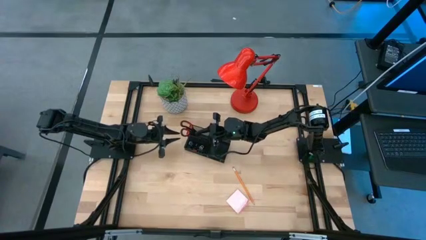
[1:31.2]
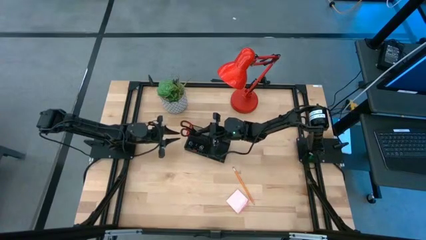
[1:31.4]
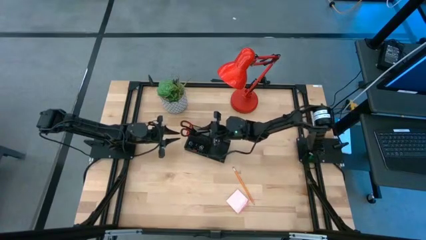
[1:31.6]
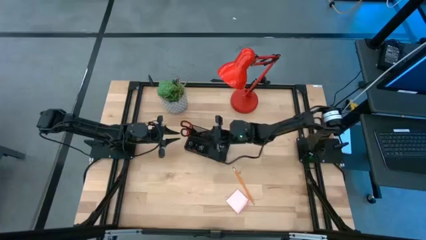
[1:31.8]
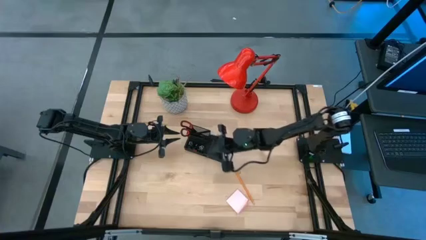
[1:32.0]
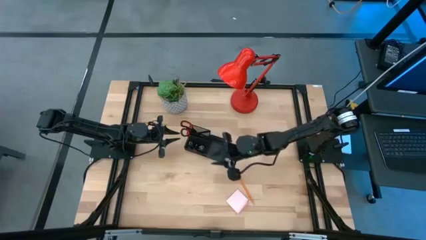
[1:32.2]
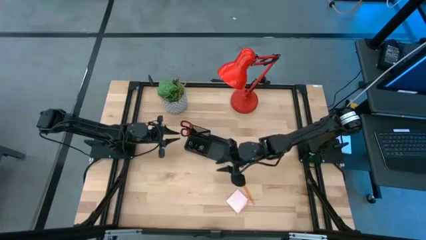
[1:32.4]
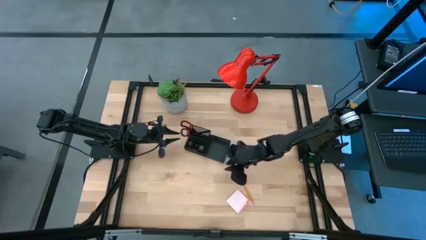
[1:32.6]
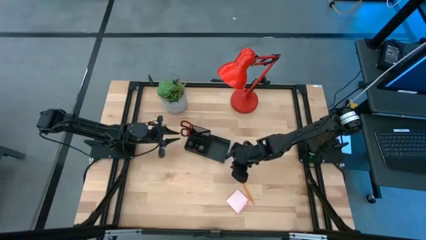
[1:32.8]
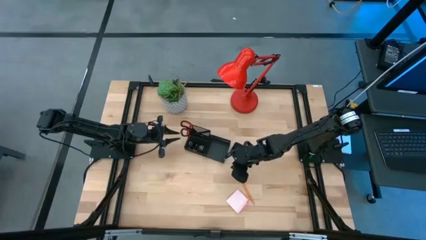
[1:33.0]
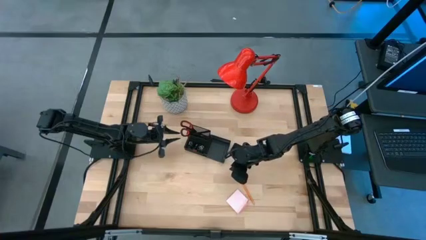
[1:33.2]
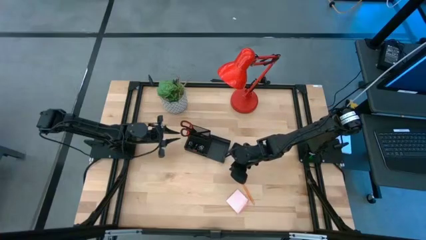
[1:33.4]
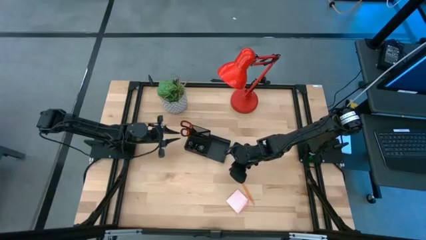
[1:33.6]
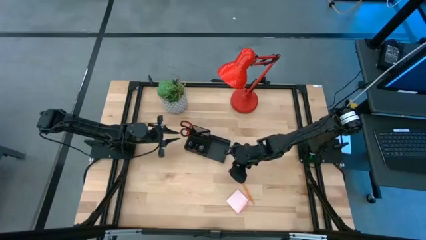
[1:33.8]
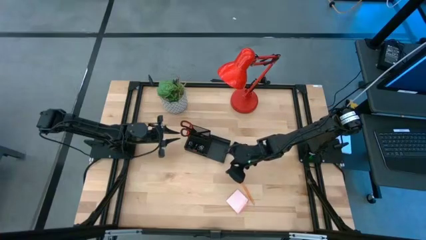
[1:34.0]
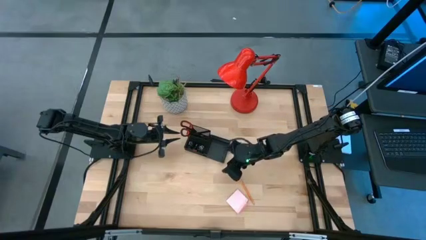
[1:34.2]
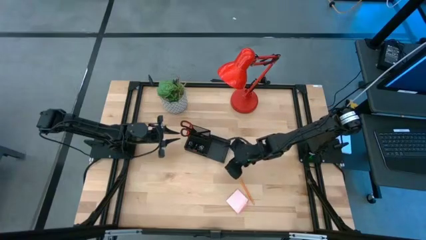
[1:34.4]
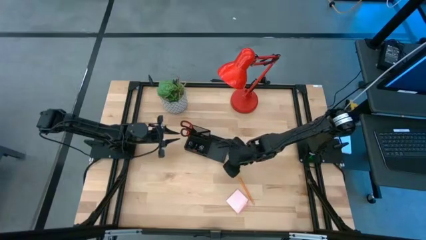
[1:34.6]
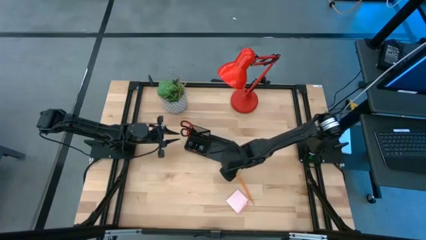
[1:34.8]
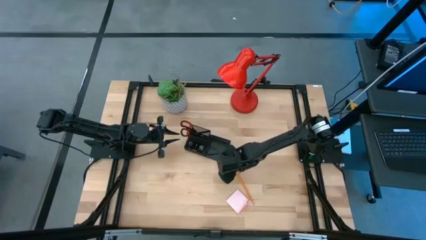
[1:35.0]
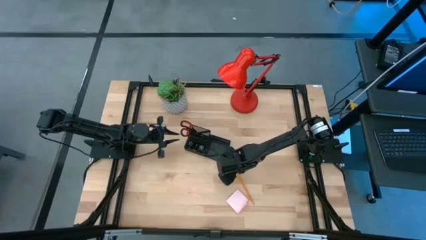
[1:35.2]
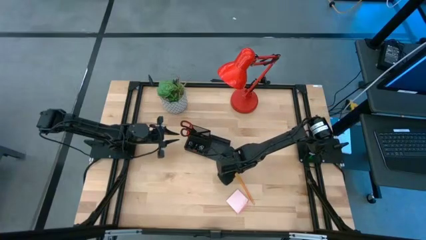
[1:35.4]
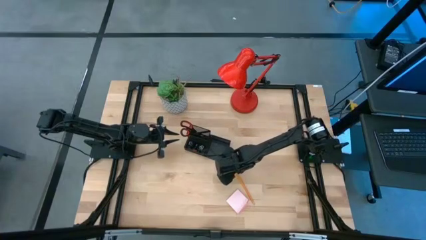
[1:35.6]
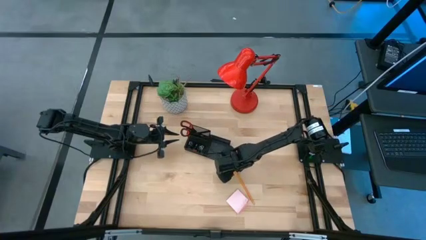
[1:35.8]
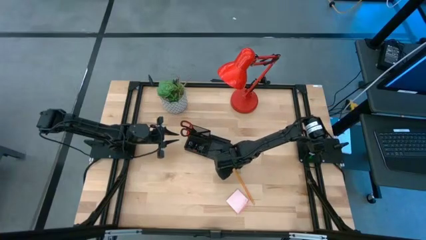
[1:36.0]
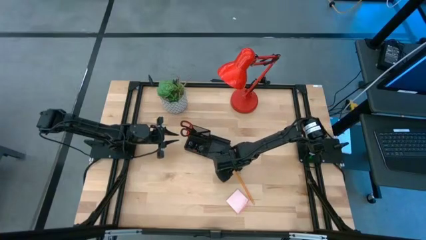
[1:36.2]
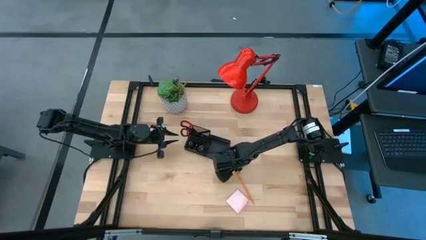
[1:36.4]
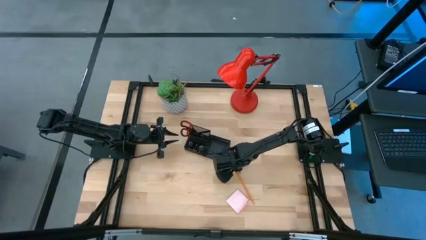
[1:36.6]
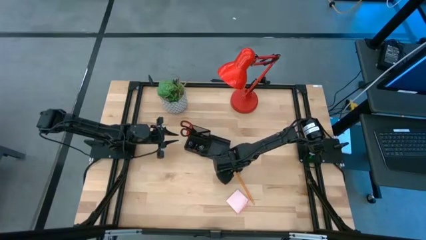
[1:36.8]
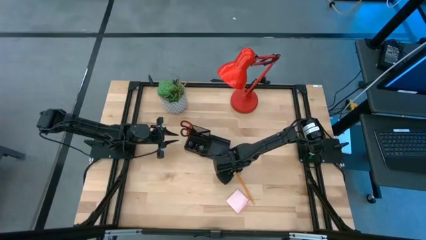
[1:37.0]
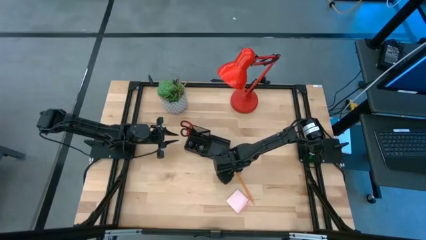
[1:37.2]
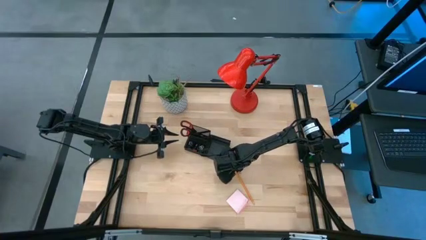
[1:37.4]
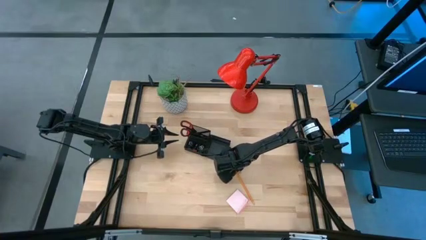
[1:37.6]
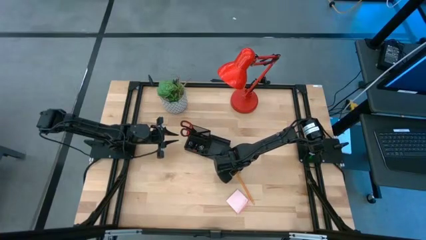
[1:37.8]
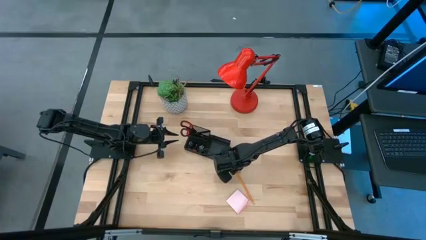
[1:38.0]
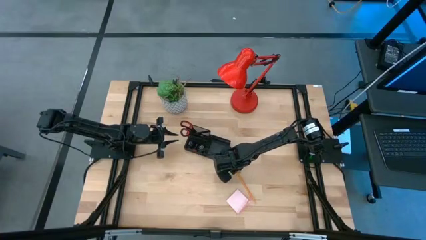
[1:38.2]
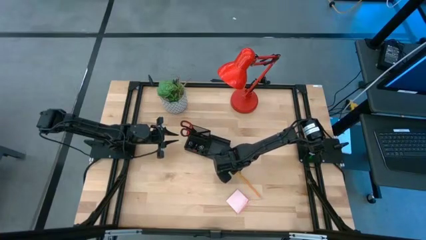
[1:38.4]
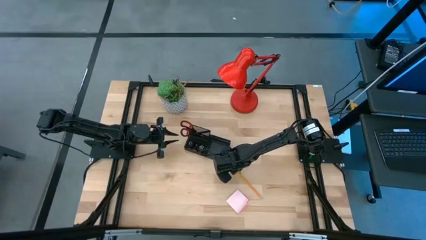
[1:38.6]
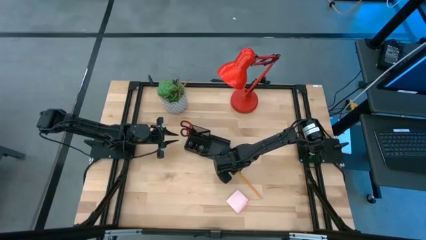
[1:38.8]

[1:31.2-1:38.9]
Task: Pick and place office supplies into organizer
Put the orange pencil into the black desk organizer

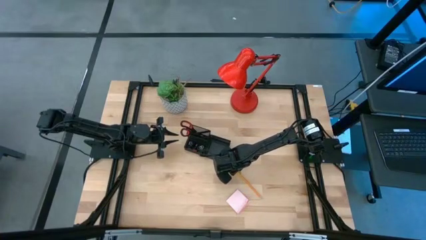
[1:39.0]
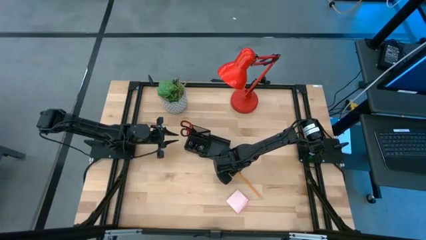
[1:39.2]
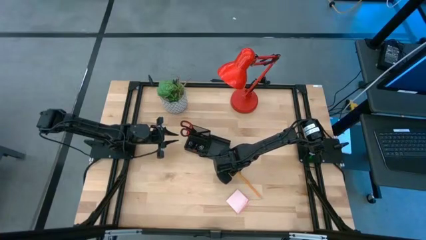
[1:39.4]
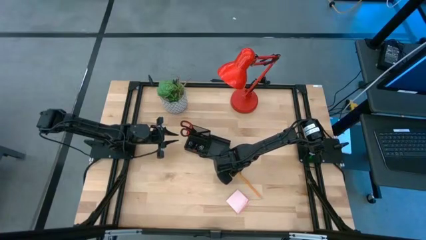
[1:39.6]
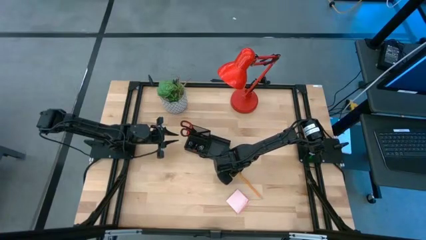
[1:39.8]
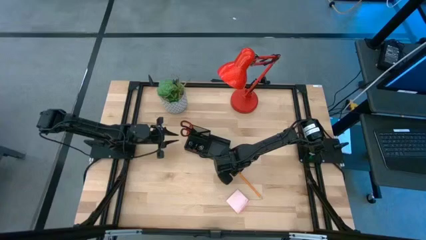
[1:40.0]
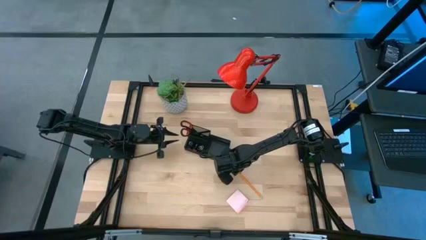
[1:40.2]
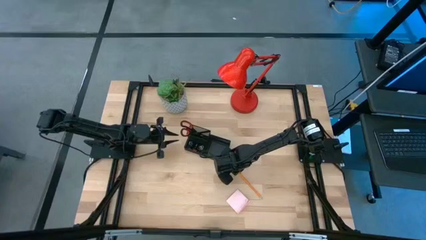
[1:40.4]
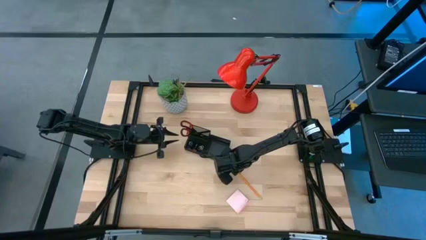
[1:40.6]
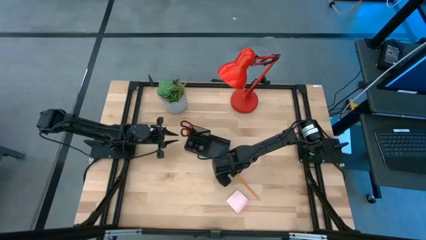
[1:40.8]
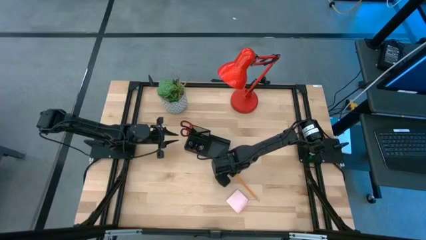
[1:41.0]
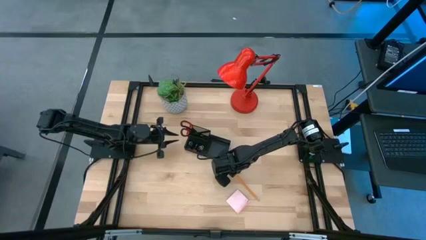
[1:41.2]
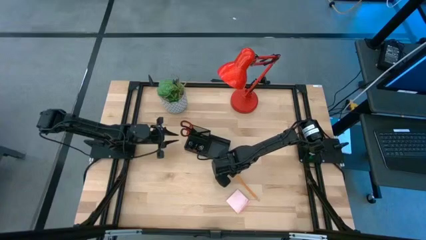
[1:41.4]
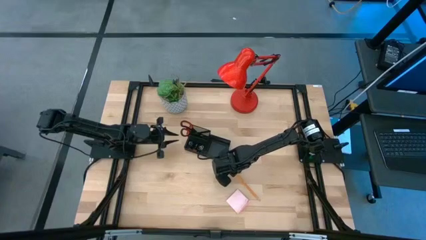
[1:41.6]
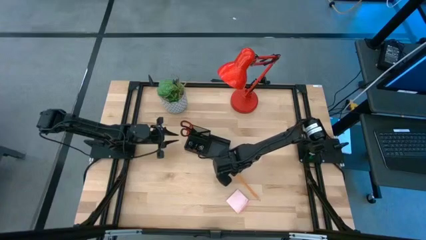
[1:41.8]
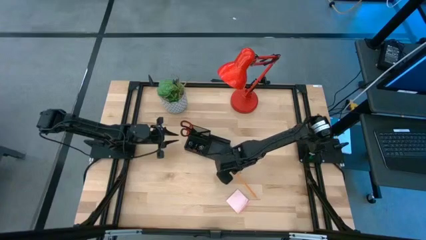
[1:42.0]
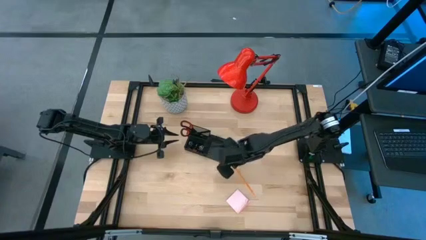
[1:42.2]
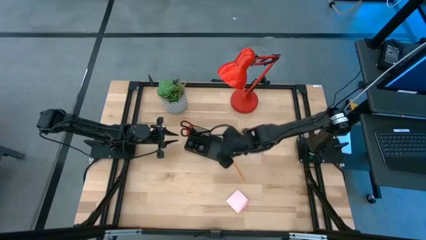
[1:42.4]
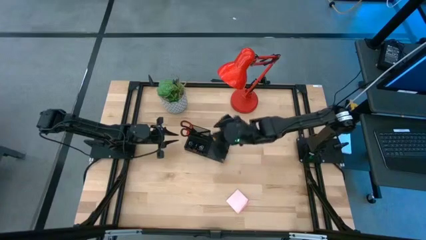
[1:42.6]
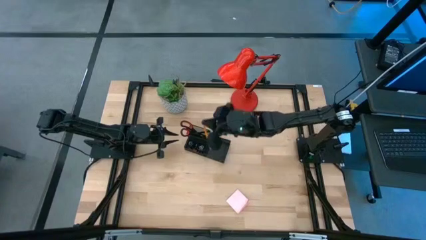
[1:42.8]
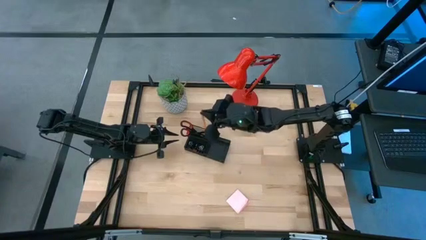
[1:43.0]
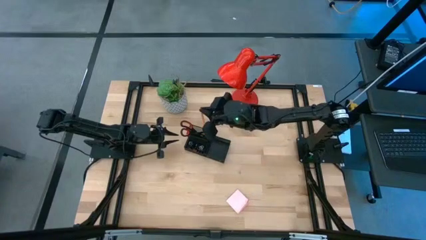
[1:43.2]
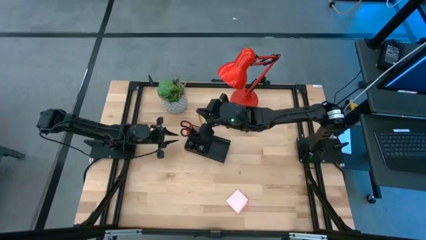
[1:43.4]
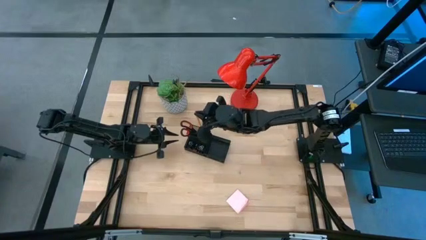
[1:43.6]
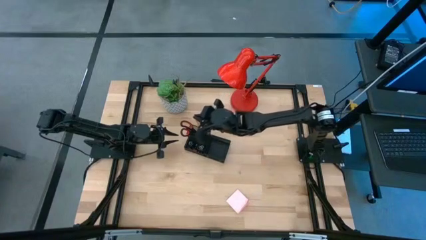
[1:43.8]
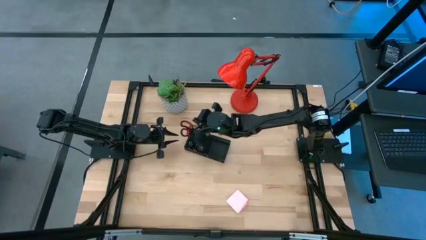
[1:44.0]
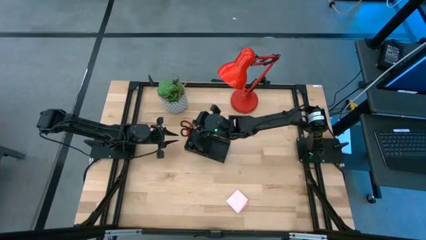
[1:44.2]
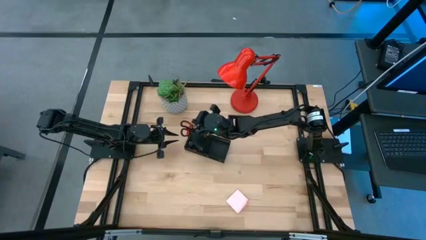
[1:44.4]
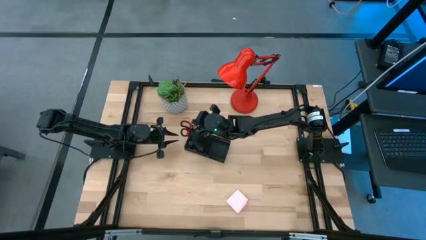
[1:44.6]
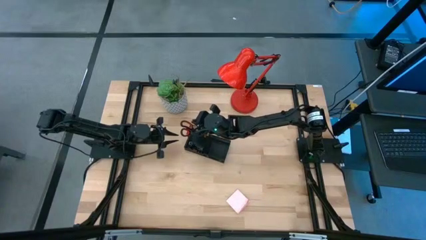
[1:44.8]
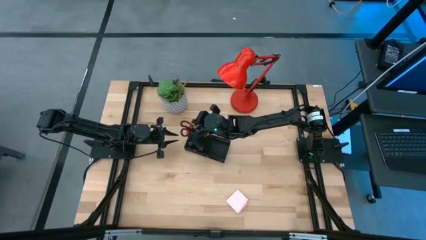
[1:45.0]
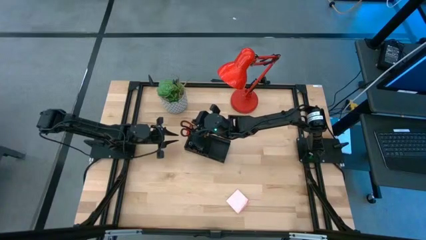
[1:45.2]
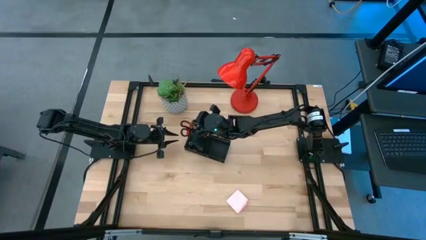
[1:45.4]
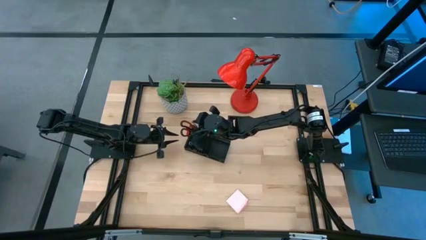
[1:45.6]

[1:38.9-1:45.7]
Put the orange pencil into the black desk organizer
